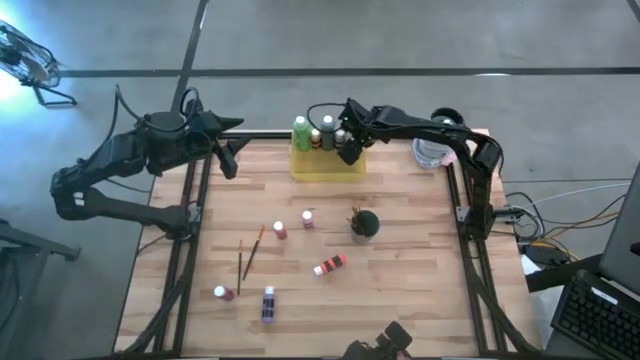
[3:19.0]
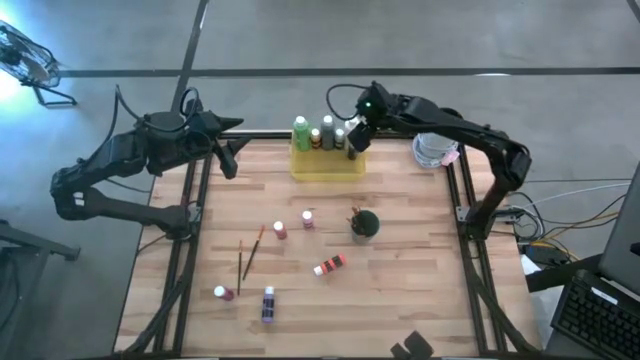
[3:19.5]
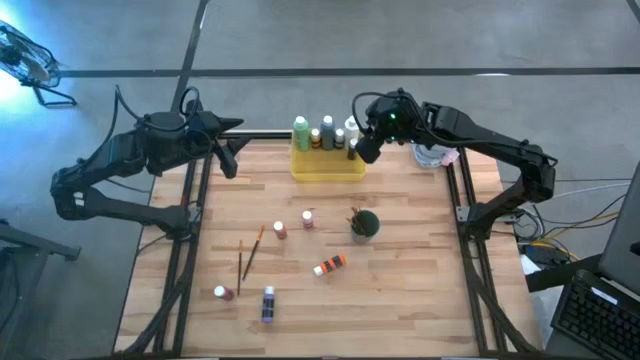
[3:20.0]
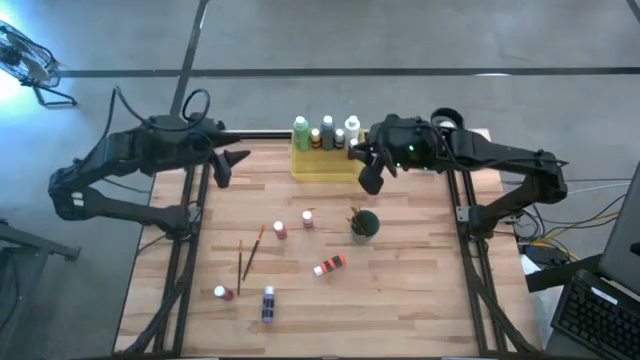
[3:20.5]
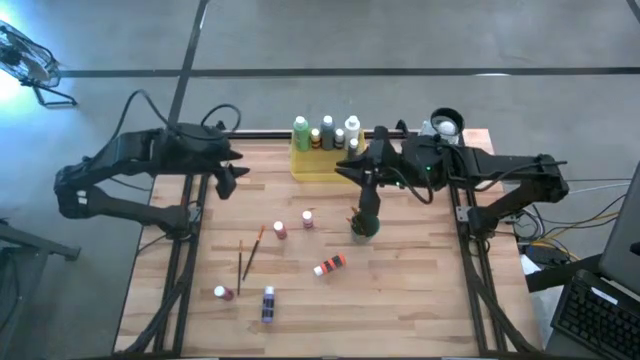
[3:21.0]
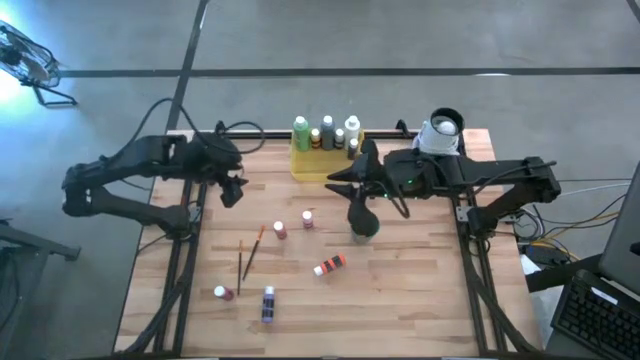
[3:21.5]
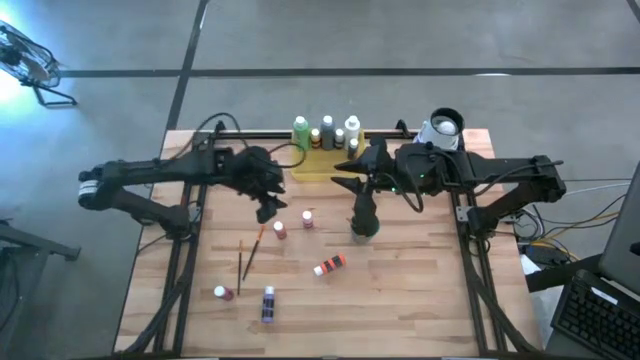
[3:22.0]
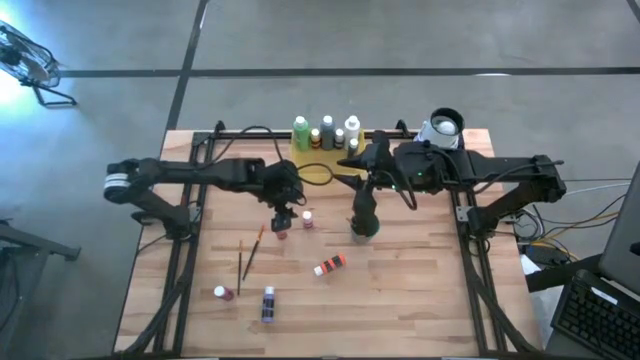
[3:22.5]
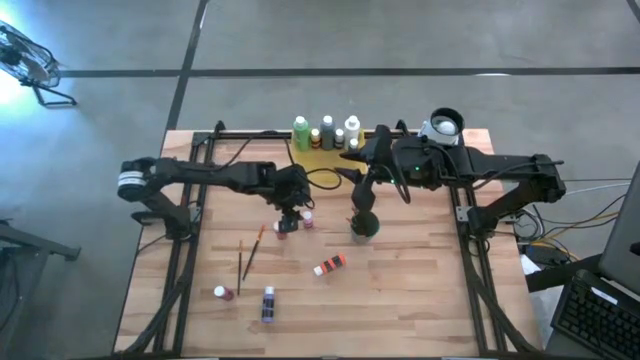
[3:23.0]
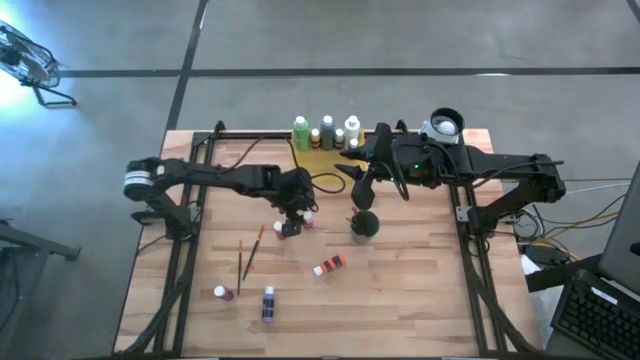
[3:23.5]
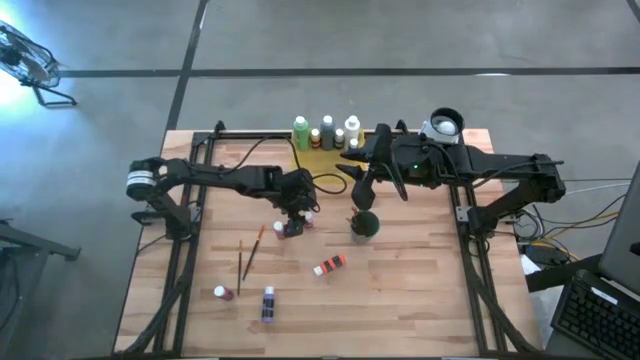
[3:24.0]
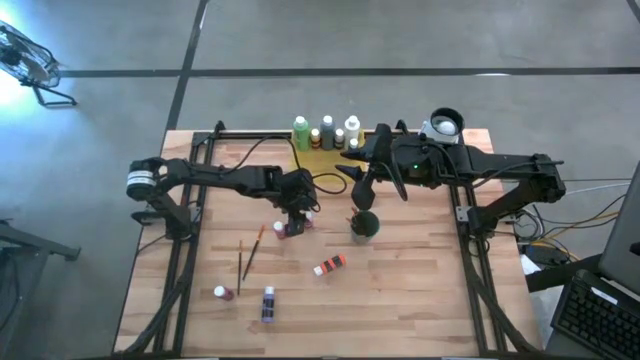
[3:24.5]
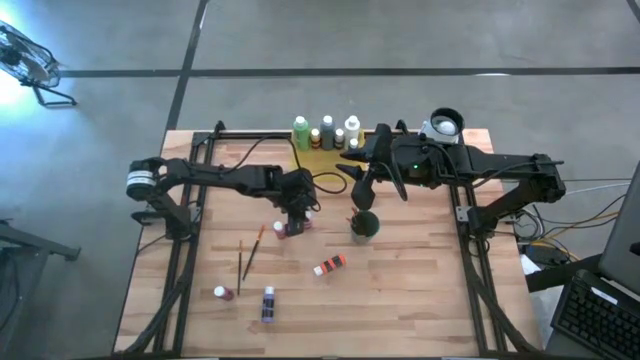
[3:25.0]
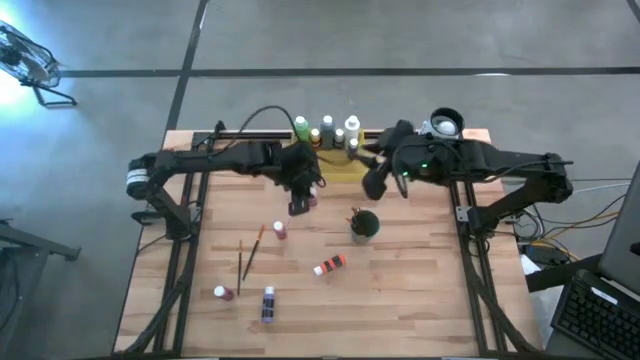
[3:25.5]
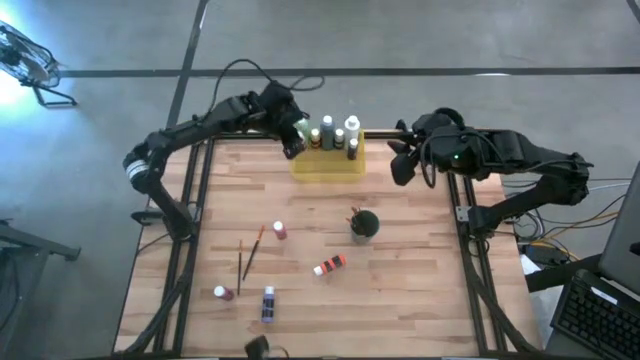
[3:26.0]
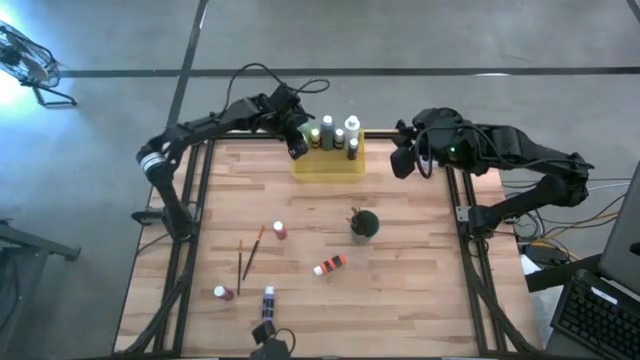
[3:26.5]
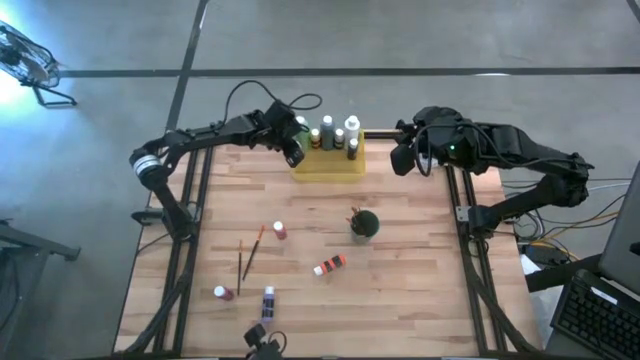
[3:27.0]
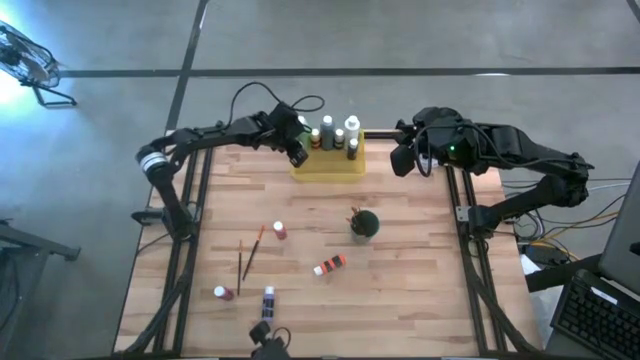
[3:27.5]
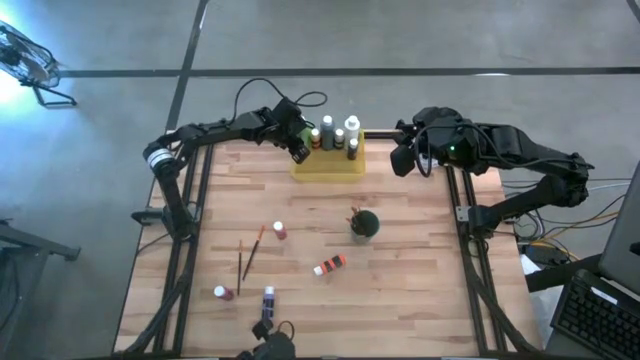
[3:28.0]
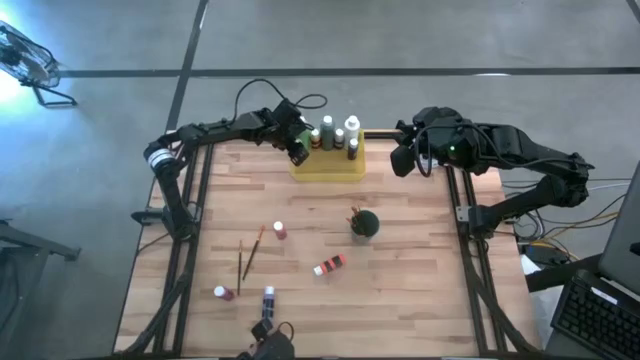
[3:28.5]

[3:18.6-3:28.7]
Task: Pick & Place Paint Supplies
Put the light pink bottle into the yellow bin

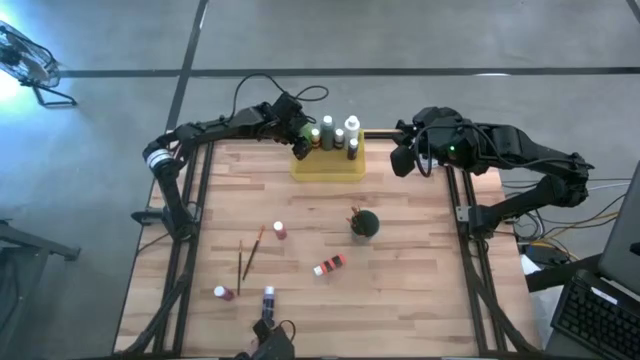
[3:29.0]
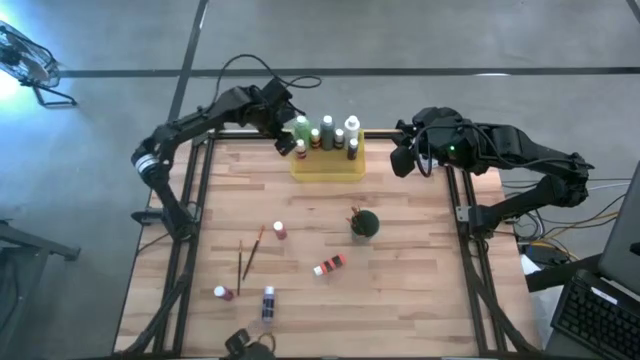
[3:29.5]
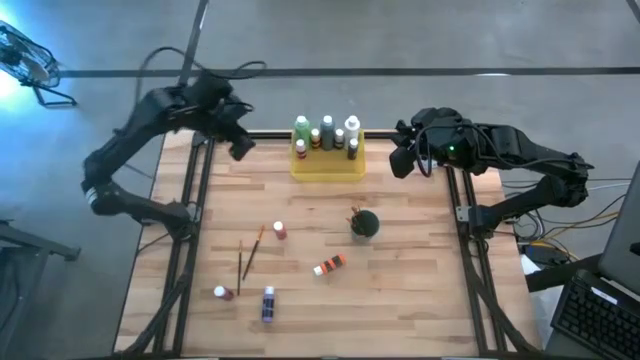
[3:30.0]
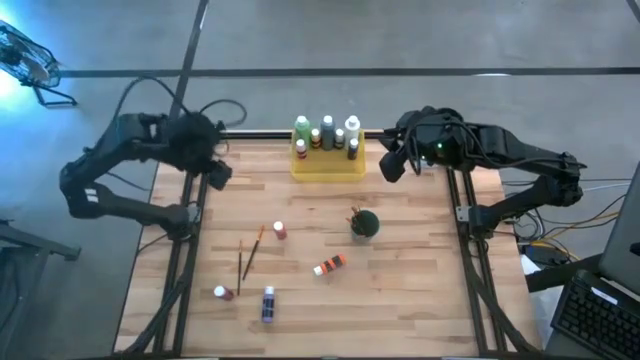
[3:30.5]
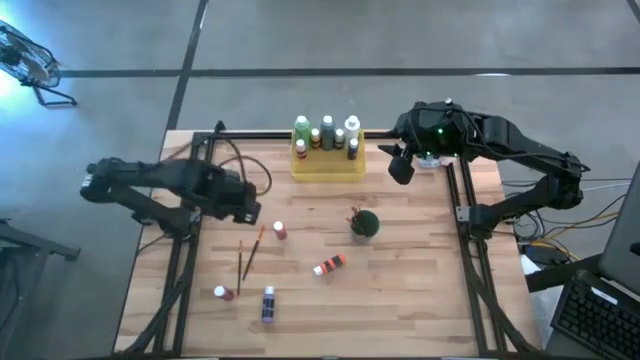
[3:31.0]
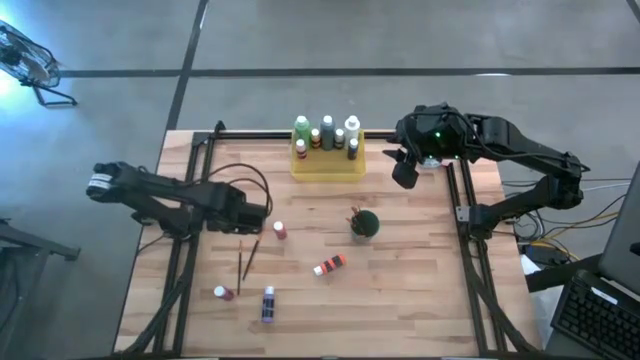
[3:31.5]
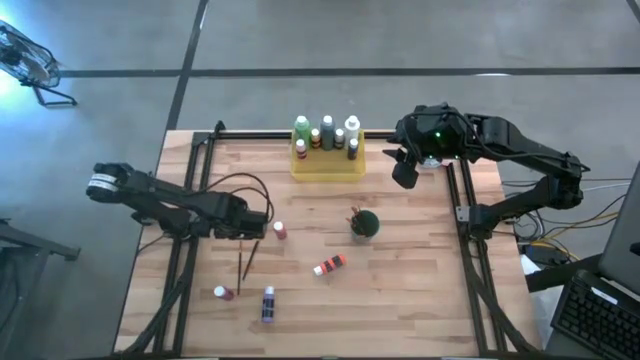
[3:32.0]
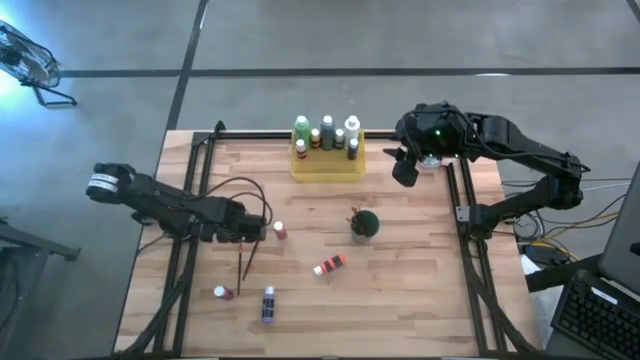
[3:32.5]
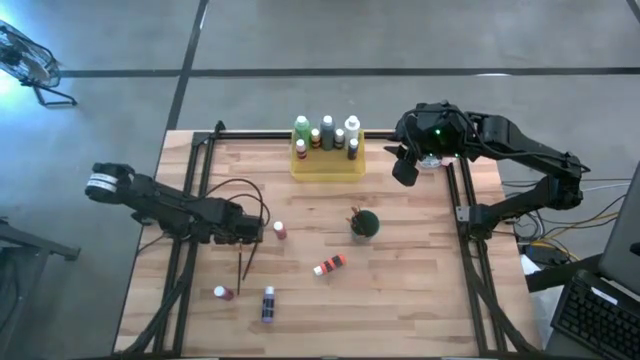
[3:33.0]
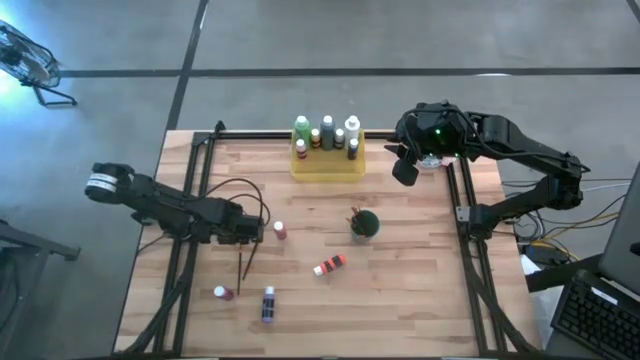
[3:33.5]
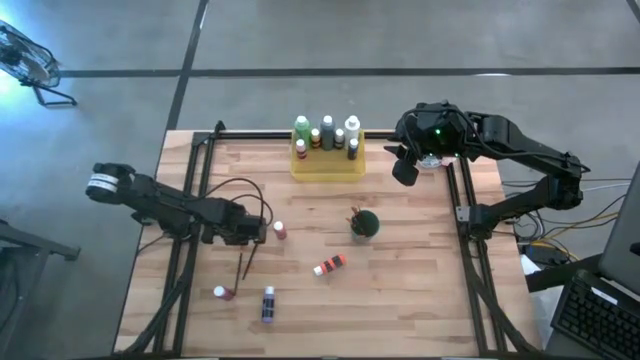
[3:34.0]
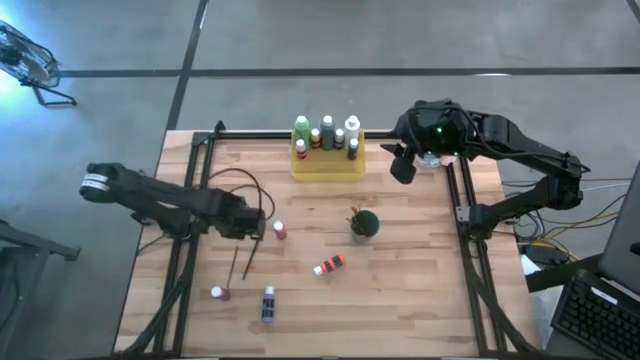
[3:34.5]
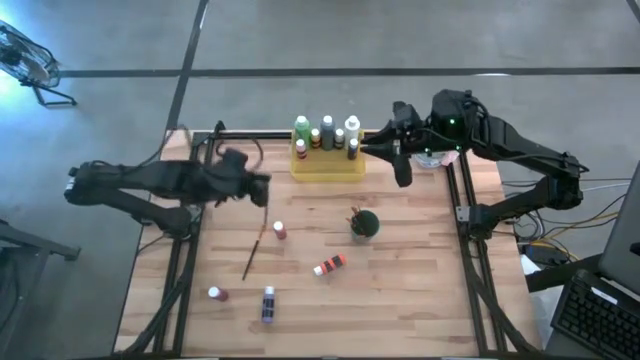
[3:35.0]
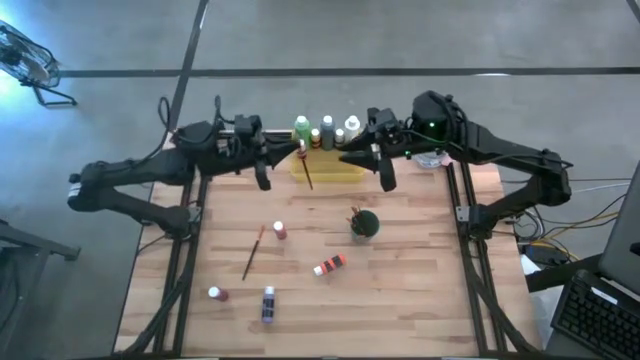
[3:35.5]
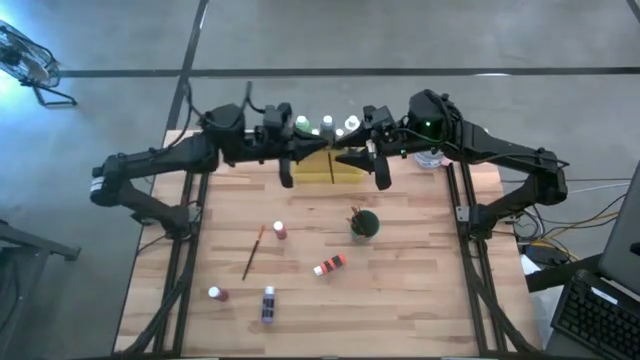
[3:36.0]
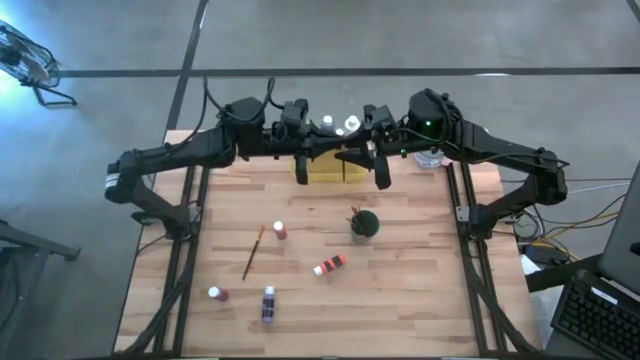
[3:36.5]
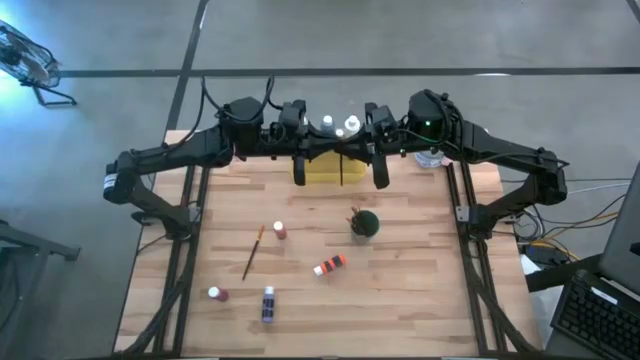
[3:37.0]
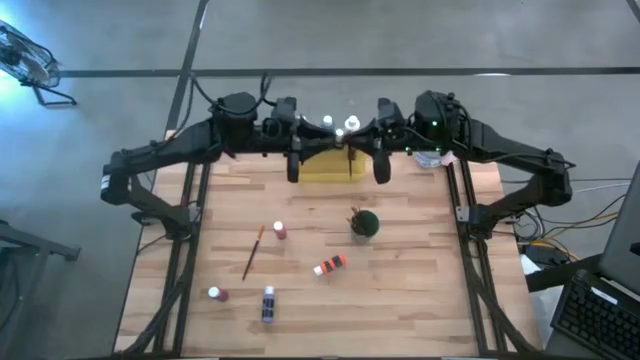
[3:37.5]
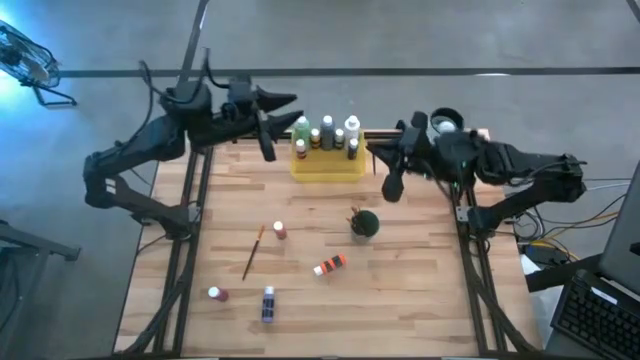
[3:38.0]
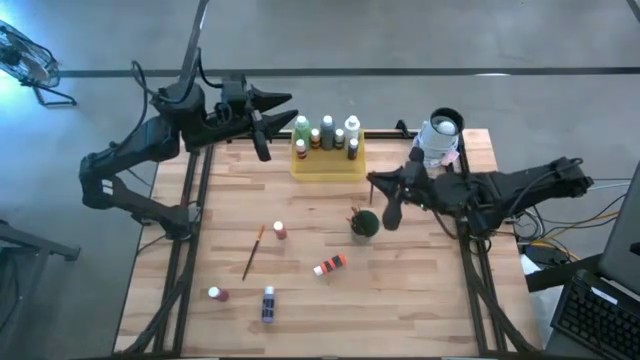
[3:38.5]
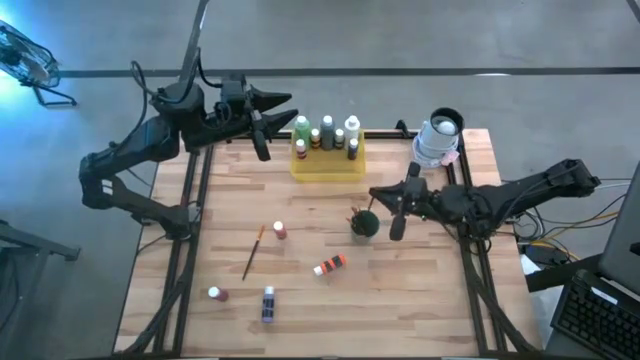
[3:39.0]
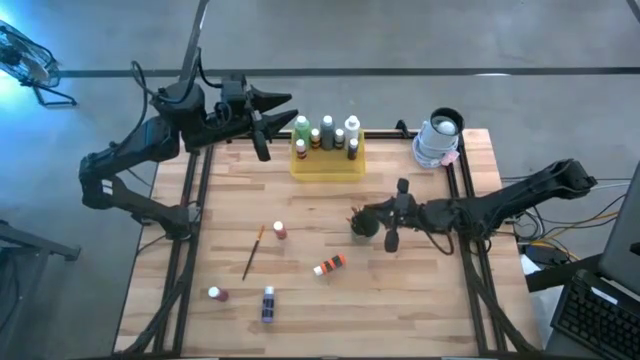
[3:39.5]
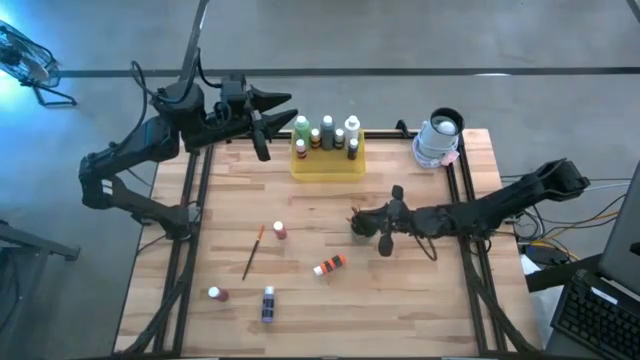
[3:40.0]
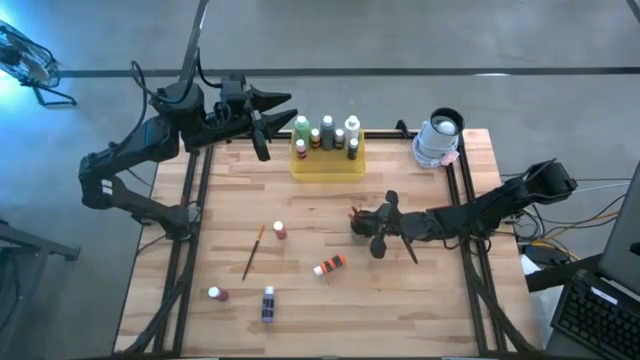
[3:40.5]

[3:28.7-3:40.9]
Put the gold paint brush into the green cup
